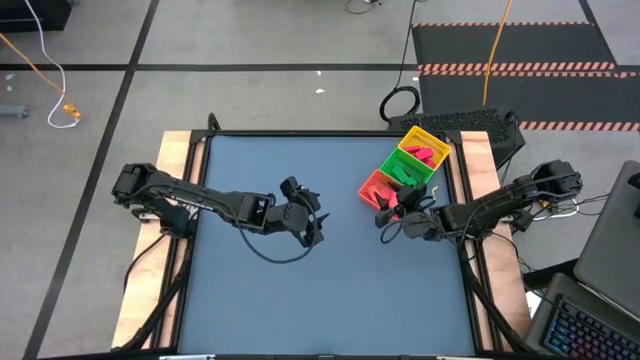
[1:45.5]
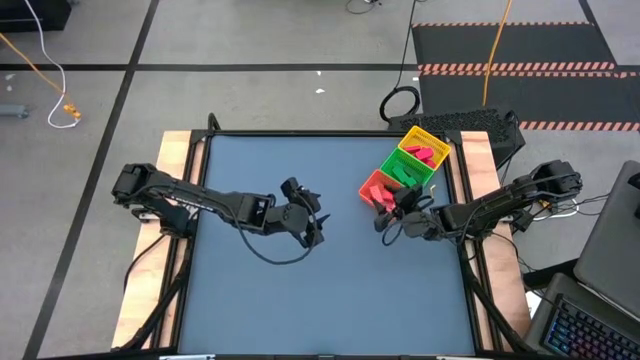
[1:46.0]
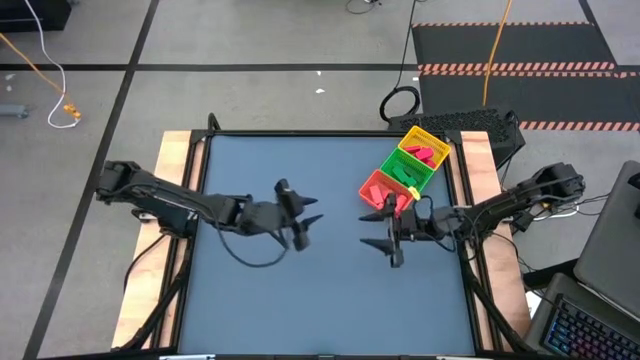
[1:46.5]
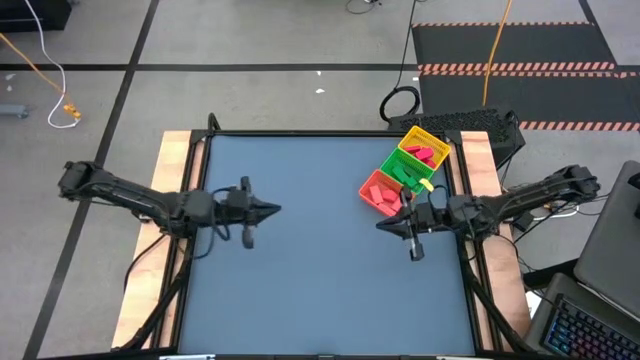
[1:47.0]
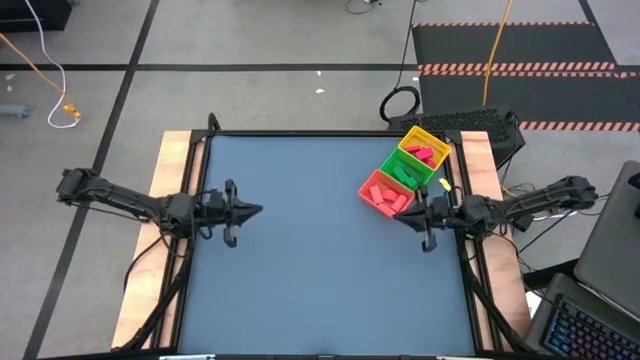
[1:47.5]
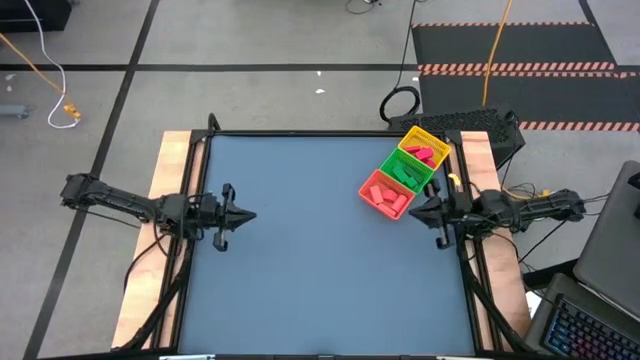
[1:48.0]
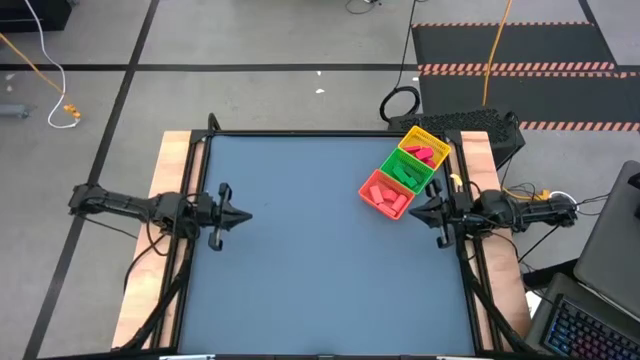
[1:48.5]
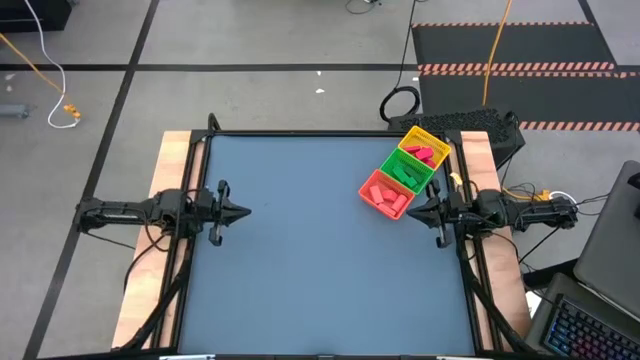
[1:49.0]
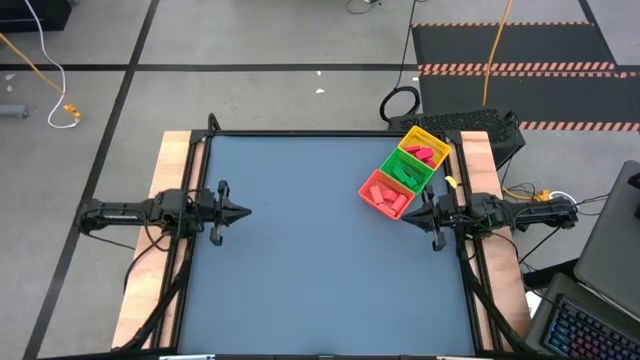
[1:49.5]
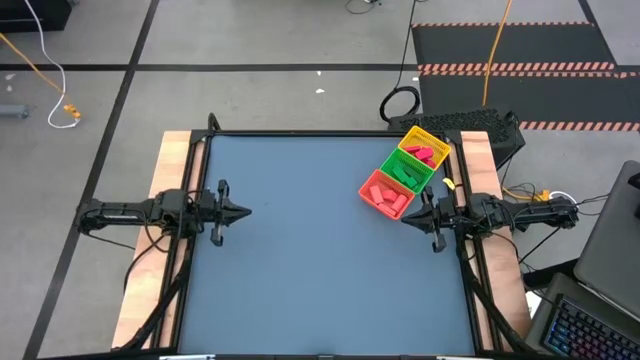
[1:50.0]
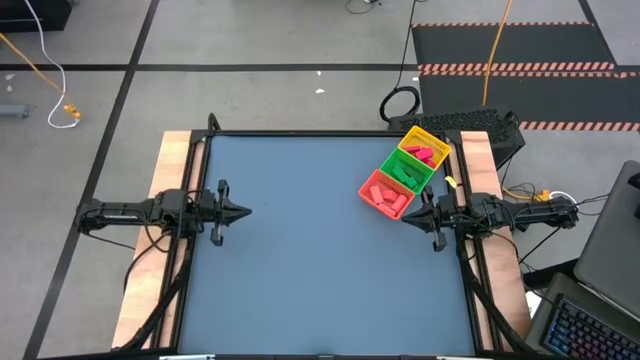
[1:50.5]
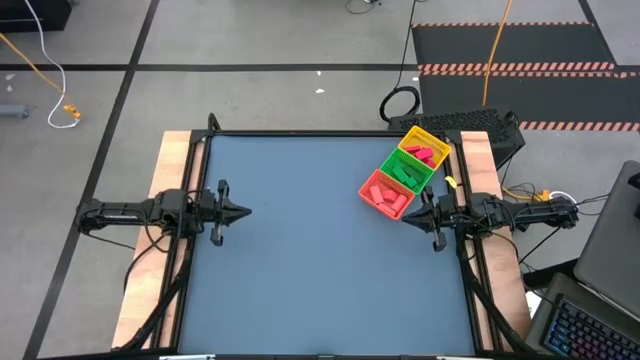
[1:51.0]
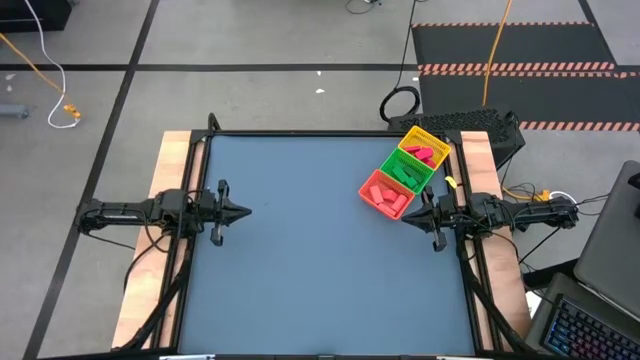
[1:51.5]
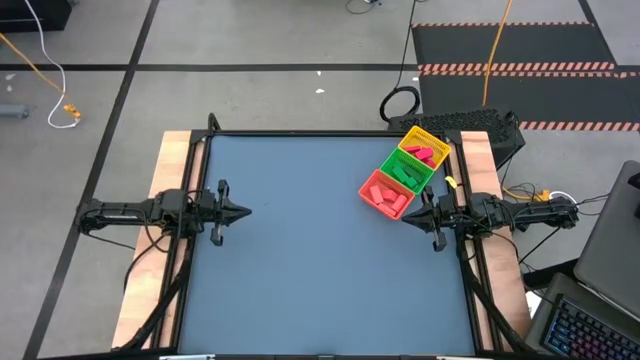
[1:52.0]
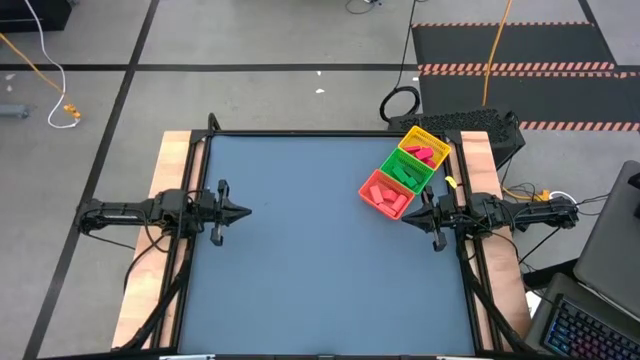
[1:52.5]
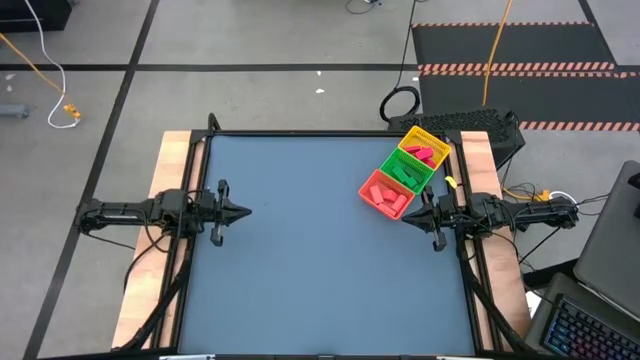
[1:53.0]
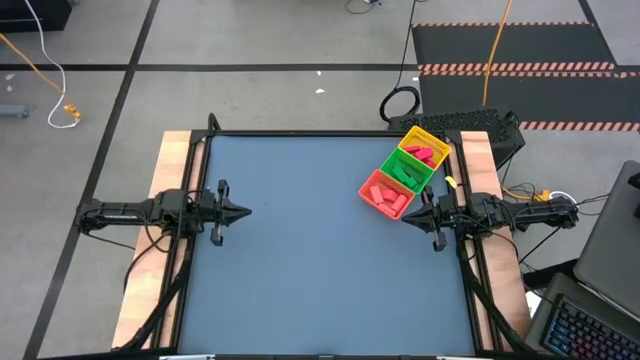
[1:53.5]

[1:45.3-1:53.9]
Task: Sort & place blocks by color
Return to Home Position
